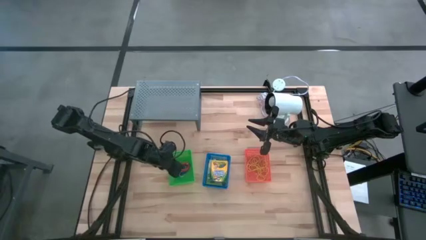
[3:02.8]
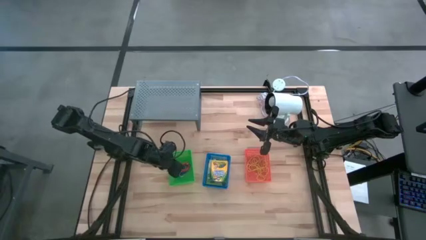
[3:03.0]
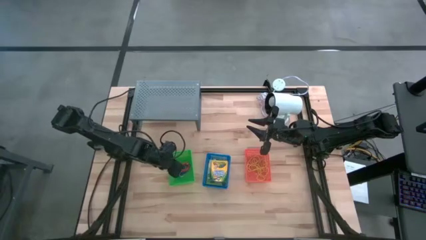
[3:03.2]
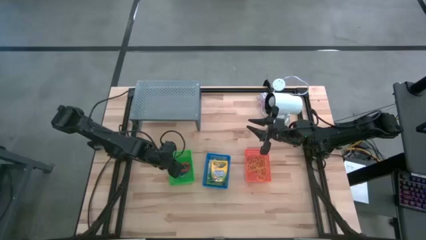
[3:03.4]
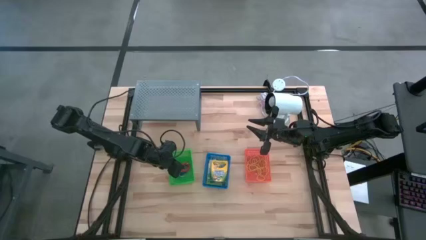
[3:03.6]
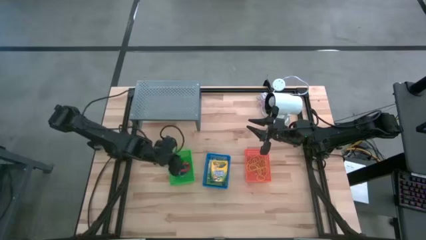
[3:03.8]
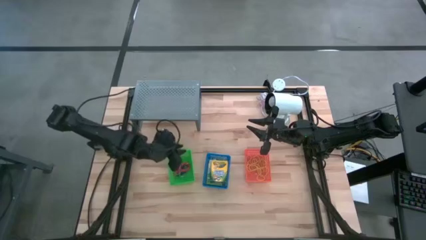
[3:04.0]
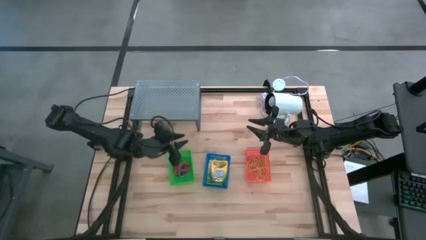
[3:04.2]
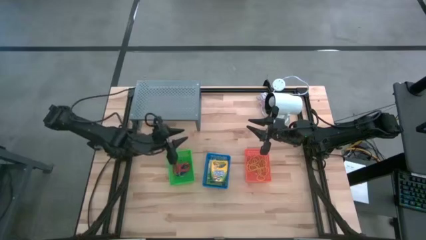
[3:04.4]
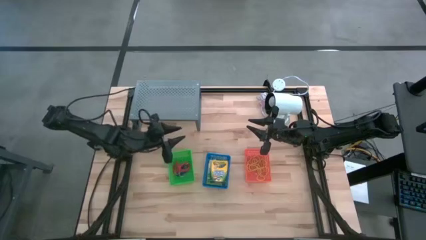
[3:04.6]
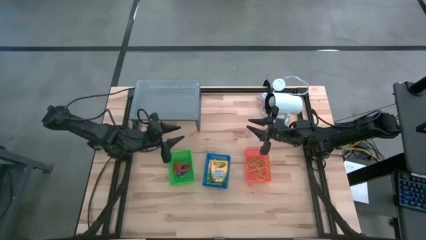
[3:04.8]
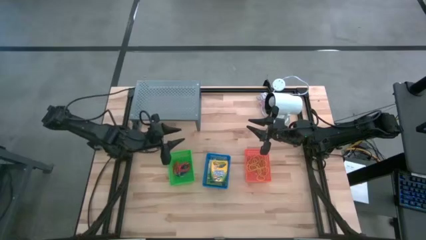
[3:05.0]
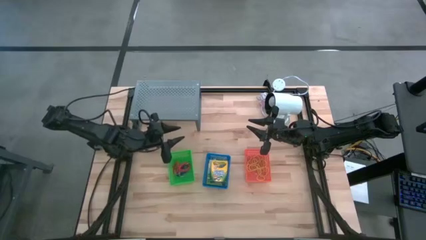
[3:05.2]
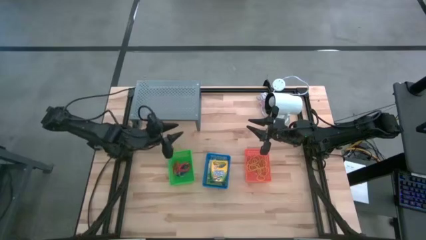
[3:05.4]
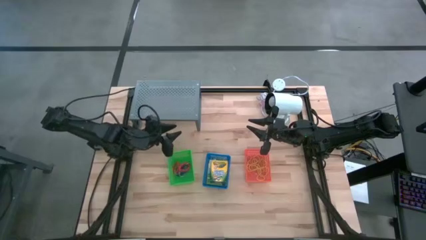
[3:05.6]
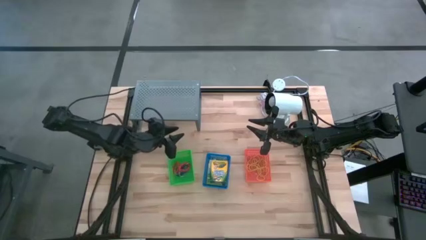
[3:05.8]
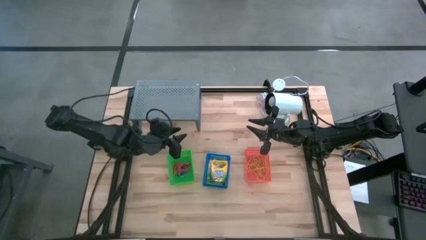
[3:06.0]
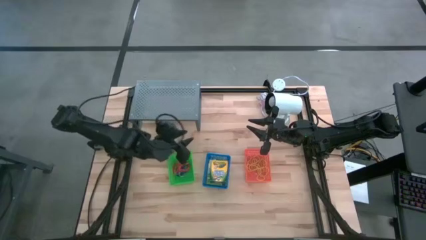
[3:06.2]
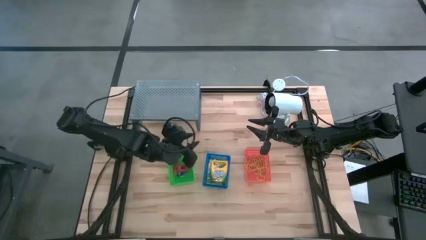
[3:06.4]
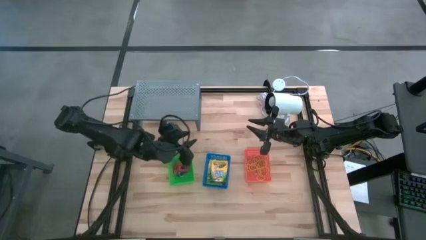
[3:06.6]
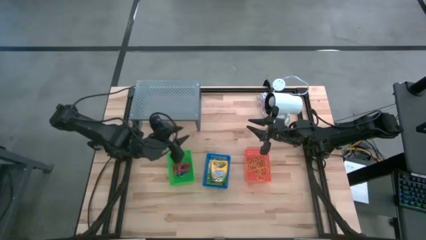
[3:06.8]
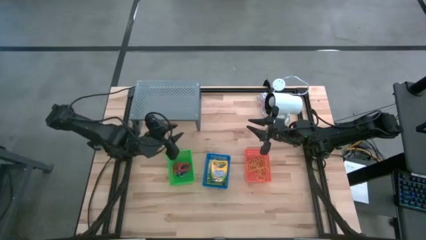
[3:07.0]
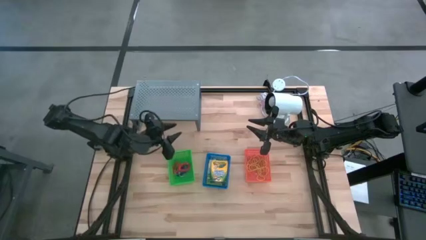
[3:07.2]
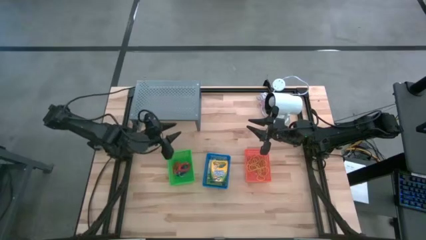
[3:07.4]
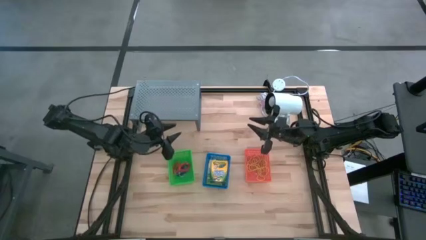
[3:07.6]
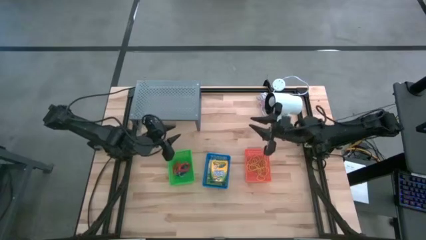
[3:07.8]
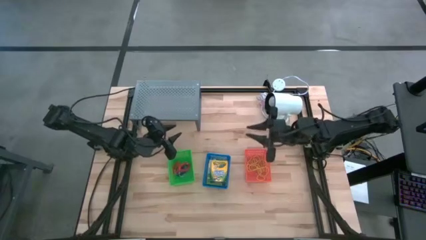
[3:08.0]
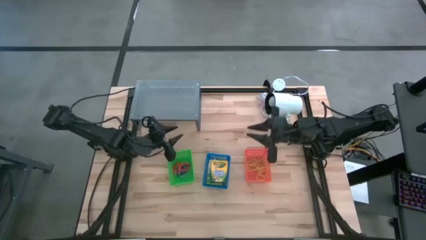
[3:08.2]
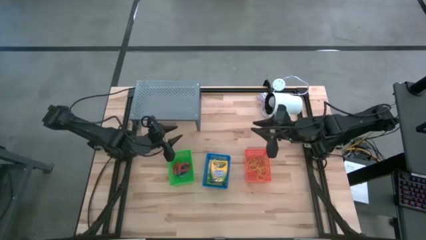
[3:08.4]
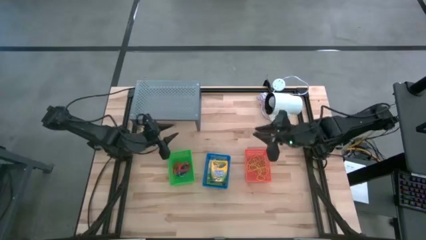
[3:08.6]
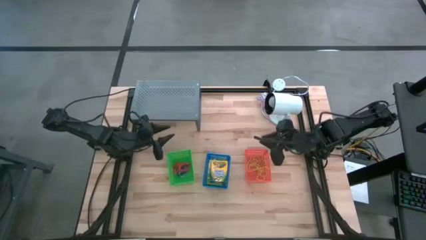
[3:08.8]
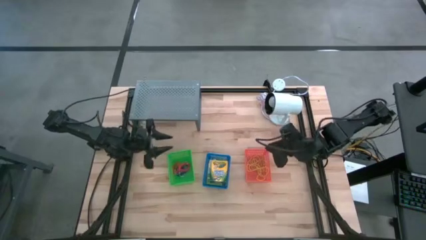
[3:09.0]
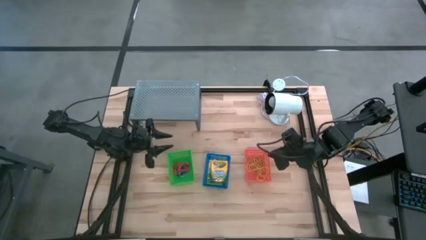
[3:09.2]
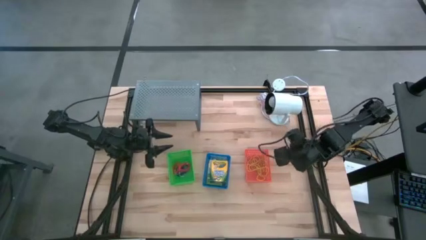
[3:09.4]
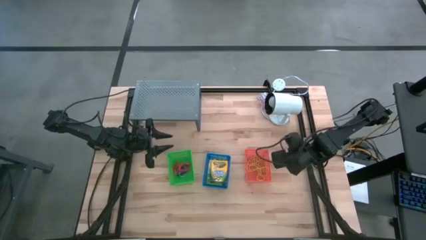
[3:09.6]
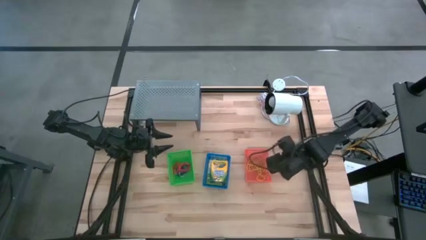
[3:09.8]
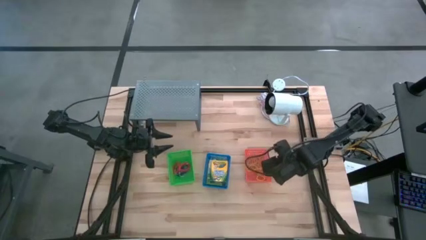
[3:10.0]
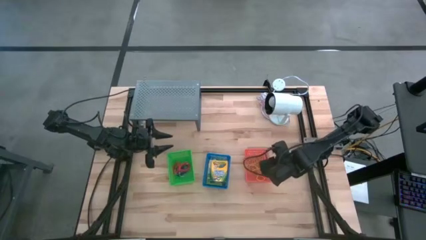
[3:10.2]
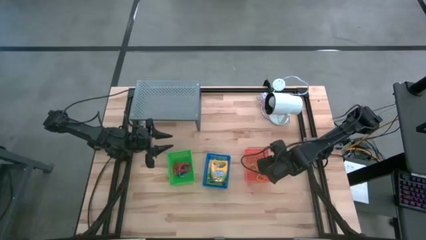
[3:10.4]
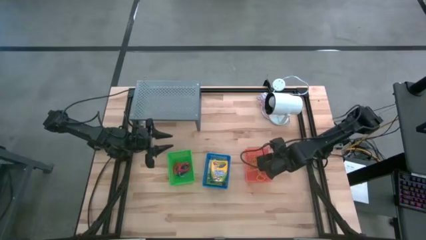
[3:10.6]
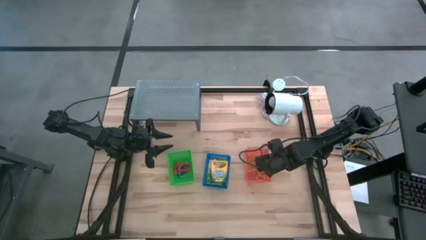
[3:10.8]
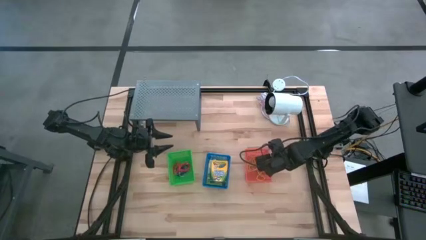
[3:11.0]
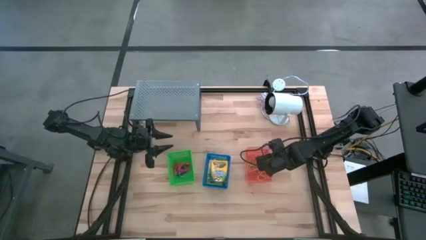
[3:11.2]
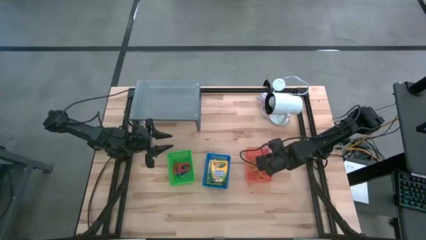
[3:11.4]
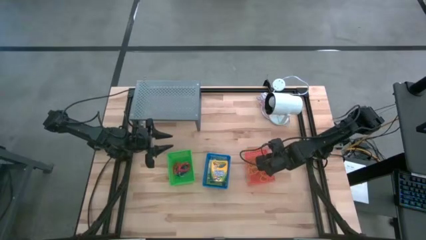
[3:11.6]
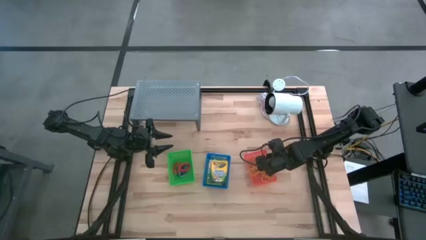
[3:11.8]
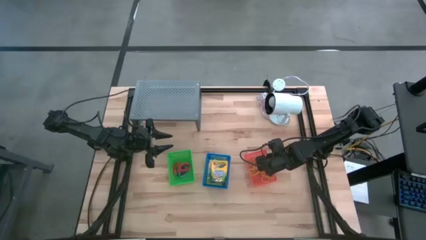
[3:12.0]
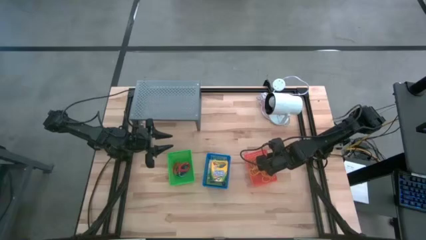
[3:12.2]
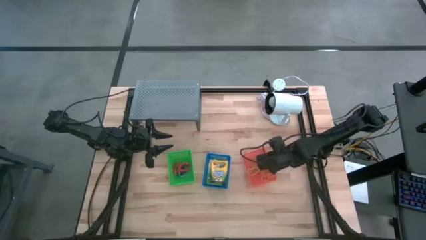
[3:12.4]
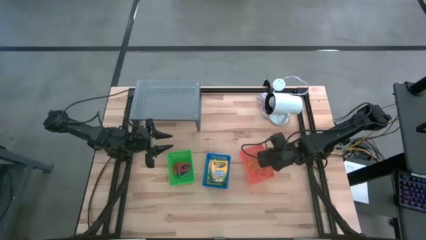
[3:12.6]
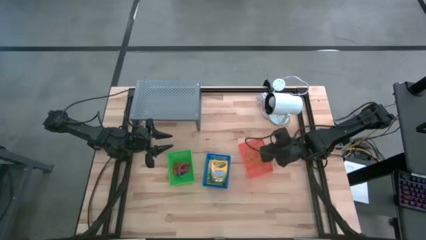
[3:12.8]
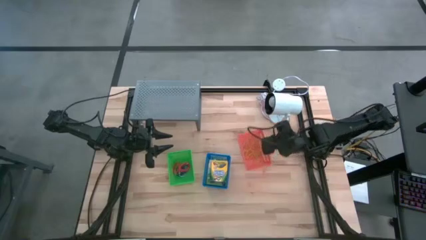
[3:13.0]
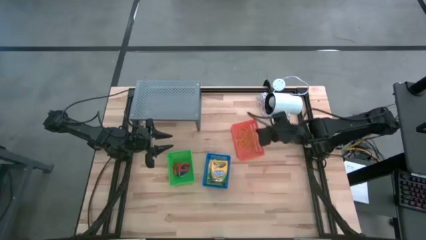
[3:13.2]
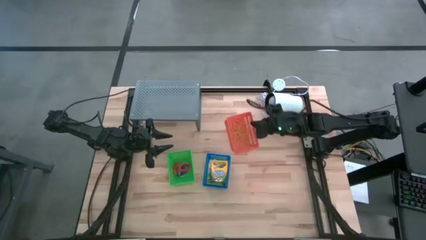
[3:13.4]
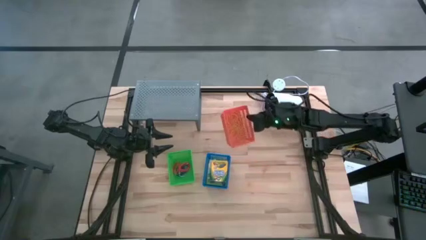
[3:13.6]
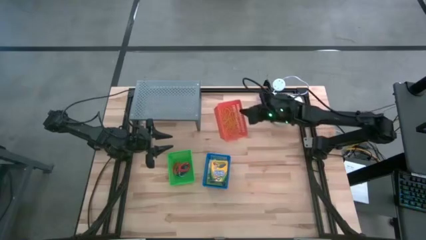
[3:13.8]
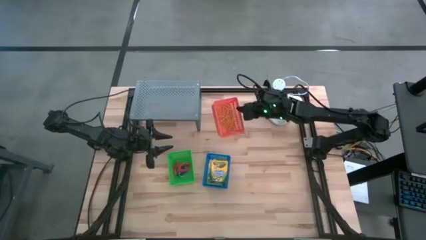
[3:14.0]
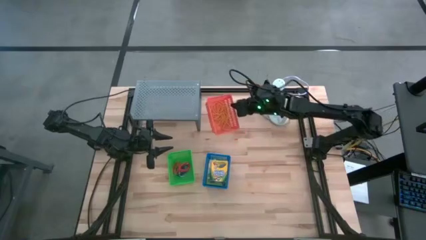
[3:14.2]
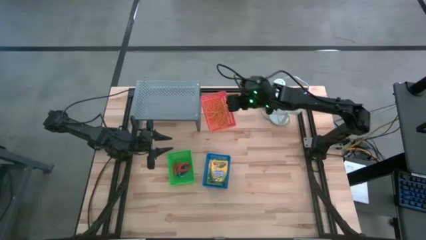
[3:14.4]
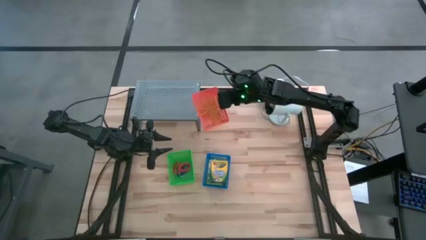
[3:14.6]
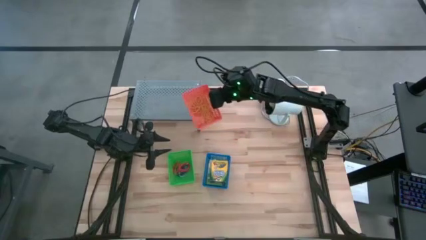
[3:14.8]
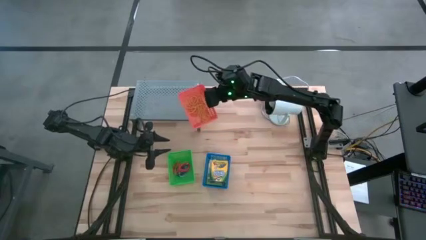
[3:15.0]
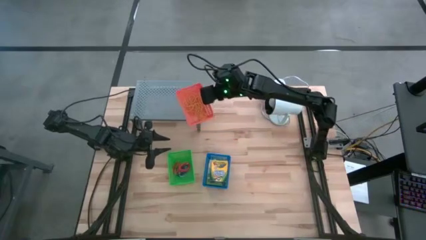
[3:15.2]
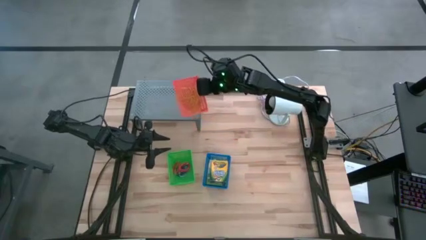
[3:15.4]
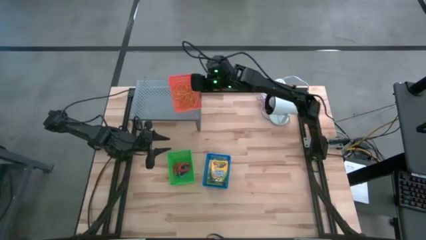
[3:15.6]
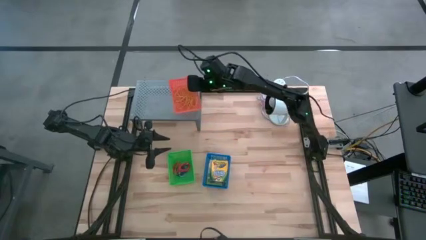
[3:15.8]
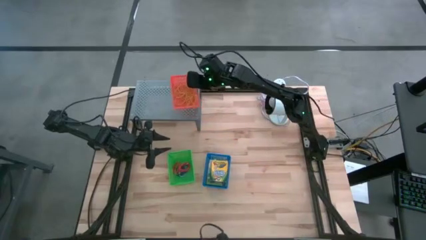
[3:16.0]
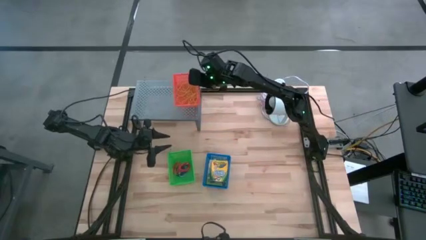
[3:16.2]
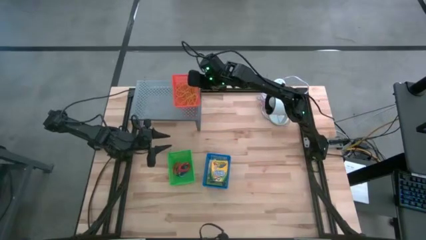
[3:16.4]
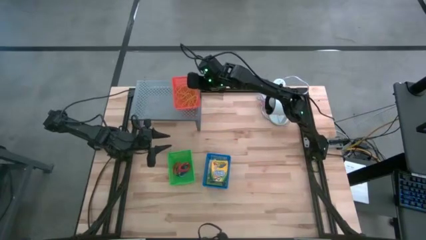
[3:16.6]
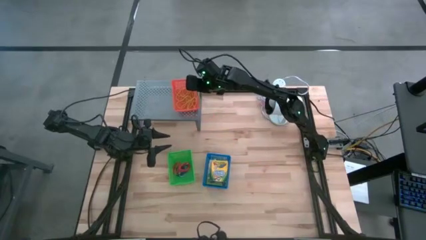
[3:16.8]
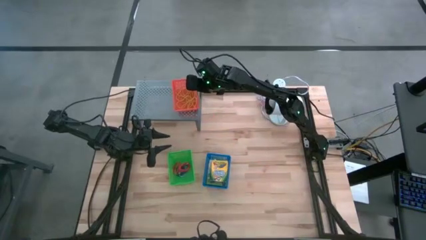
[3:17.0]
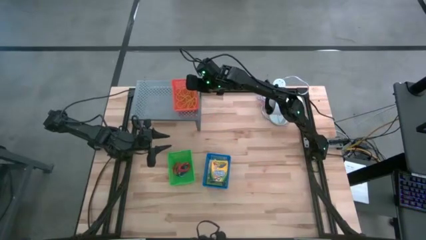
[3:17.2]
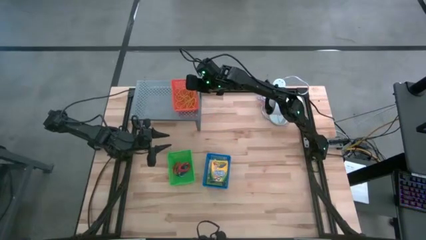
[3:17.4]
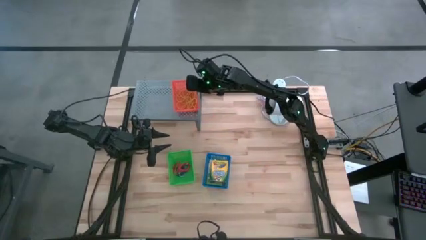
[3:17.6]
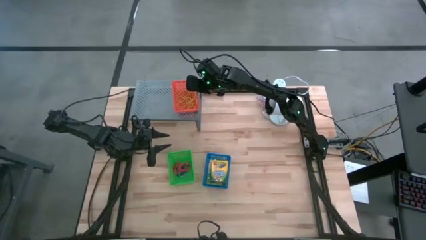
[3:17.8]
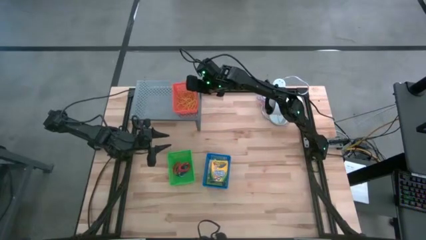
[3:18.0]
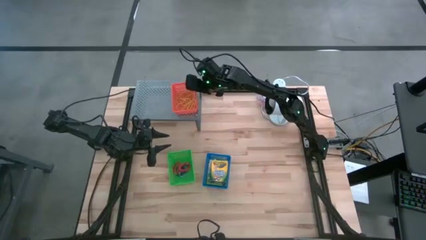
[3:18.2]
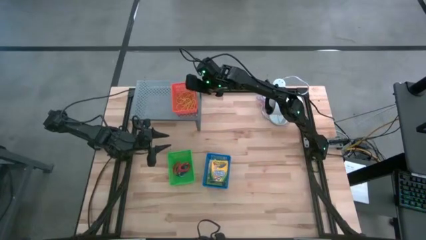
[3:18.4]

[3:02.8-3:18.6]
Task: Pick & Place Office Desk Supplies
Put the orange bin filled with rubber bands on the shelf

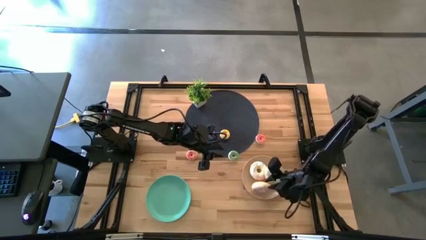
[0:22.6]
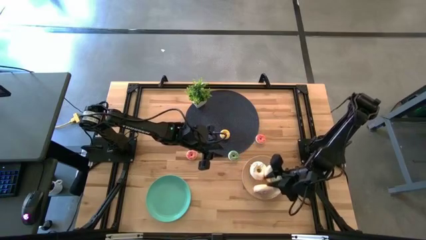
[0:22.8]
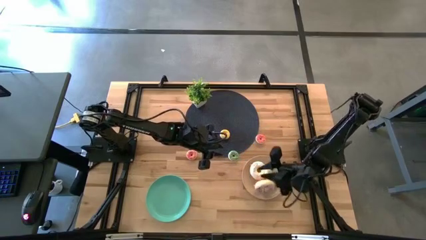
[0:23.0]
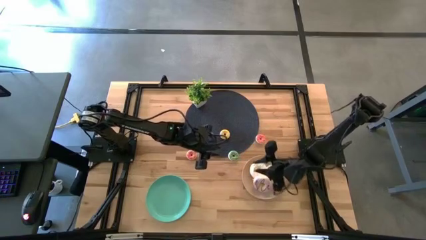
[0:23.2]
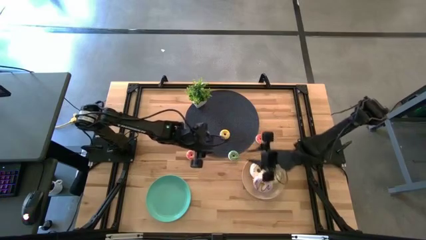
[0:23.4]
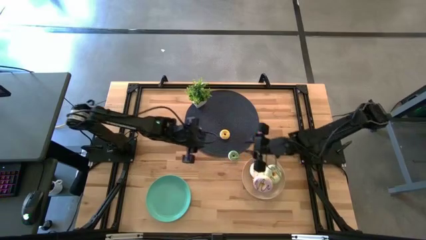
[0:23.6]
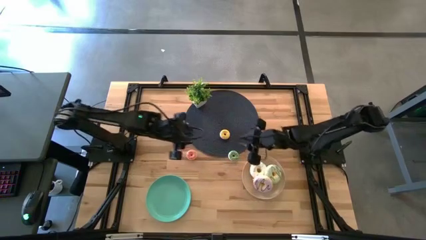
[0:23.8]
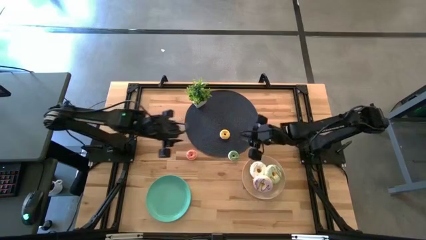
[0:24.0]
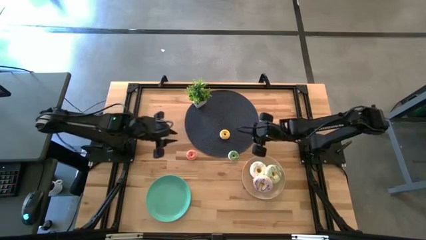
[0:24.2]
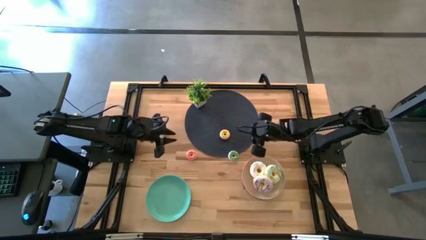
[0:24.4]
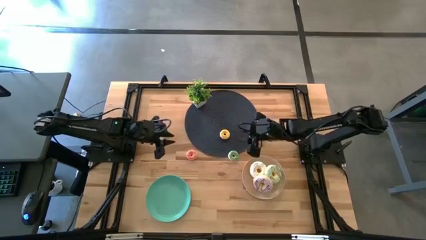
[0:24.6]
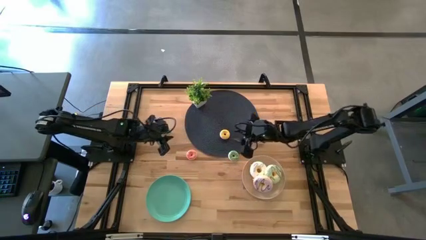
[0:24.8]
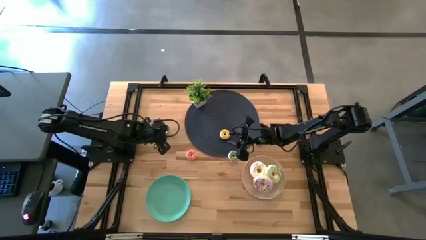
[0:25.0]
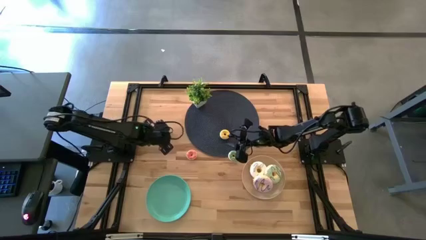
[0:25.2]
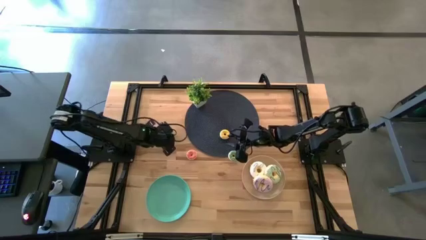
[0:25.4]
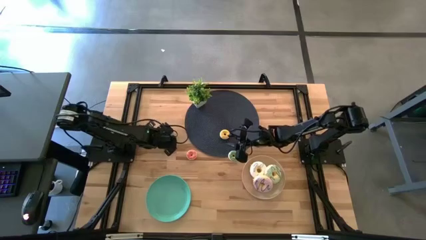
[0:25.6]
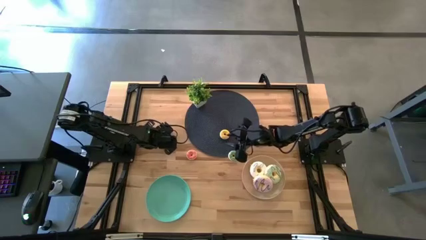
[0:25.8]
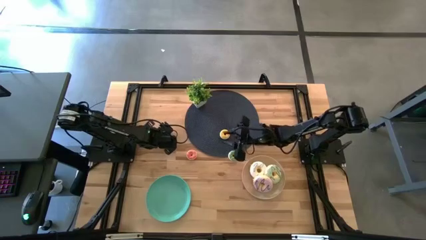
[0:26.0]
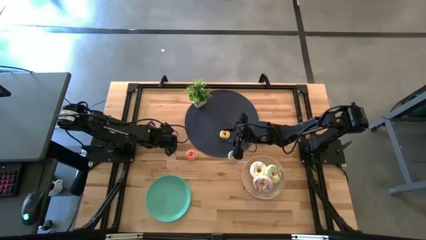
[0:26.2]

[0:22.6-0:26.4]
Task: Pick & Place donuts
Put the left small green donut on the blue plate
